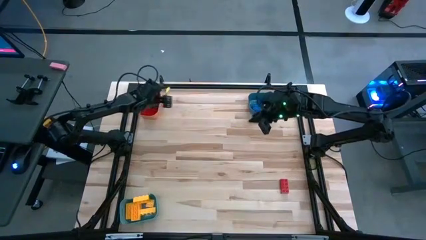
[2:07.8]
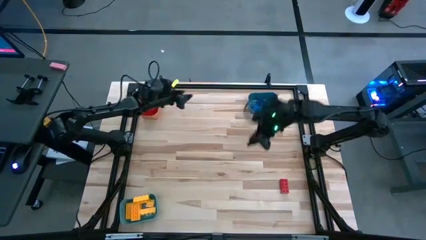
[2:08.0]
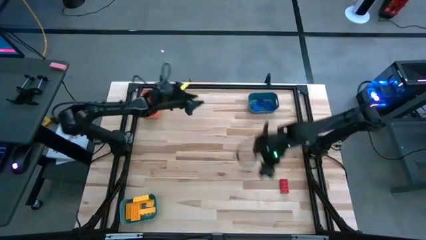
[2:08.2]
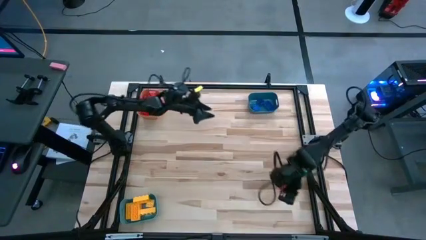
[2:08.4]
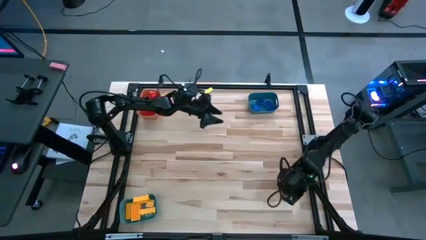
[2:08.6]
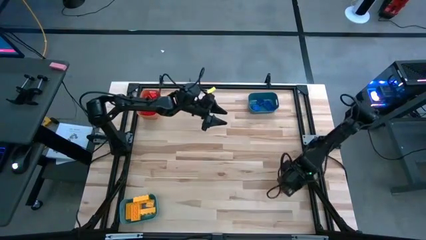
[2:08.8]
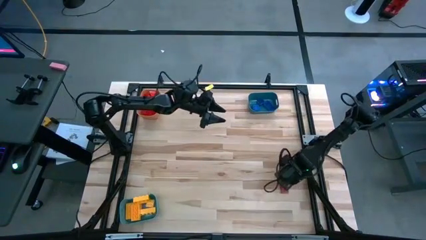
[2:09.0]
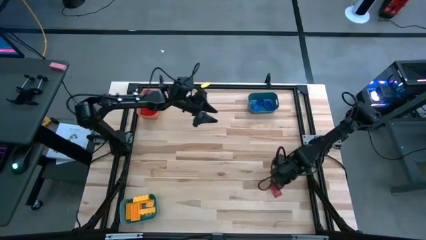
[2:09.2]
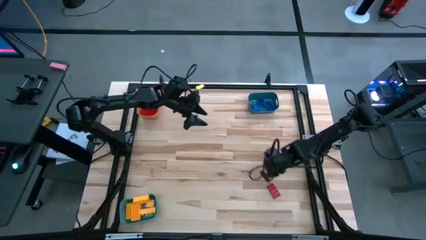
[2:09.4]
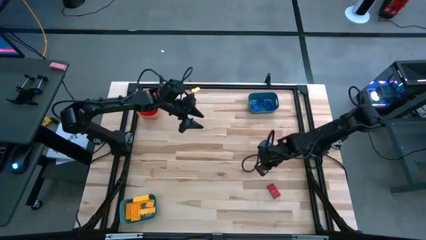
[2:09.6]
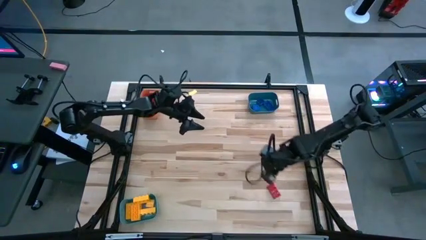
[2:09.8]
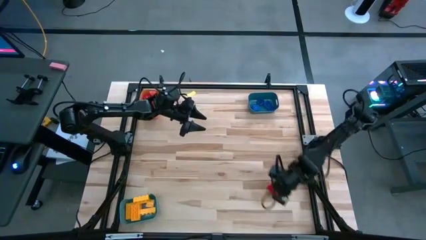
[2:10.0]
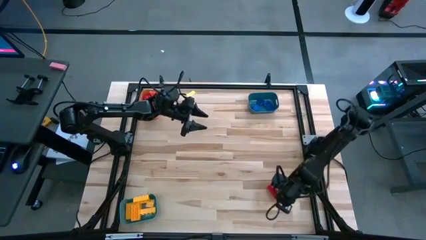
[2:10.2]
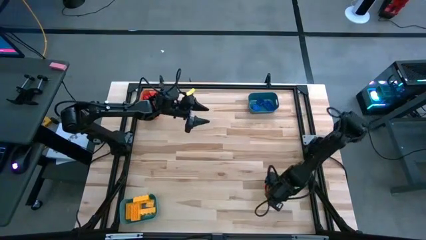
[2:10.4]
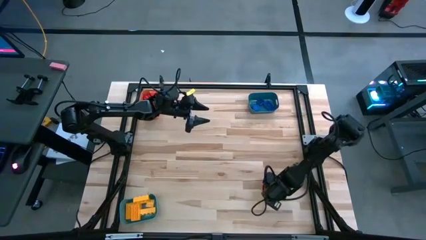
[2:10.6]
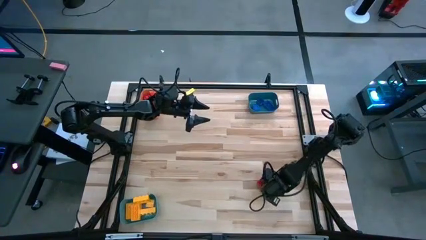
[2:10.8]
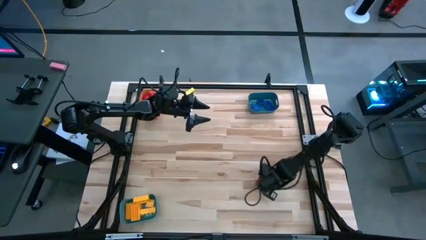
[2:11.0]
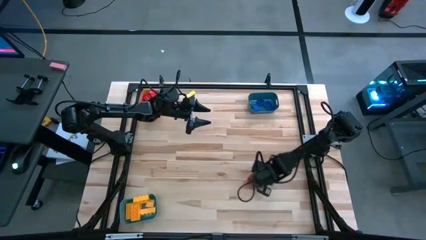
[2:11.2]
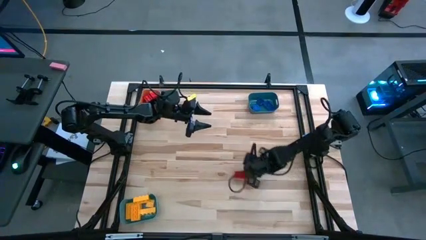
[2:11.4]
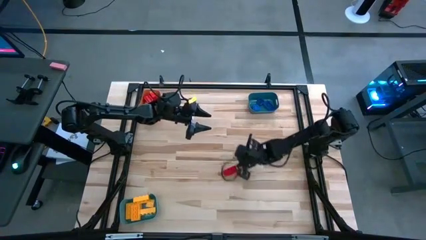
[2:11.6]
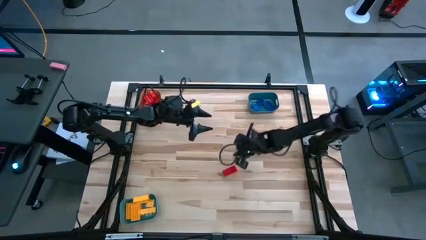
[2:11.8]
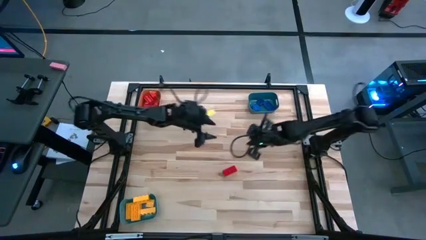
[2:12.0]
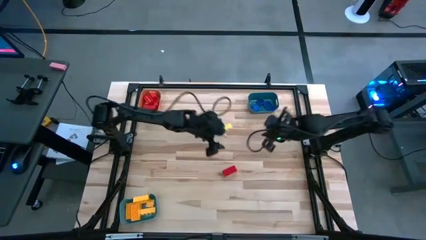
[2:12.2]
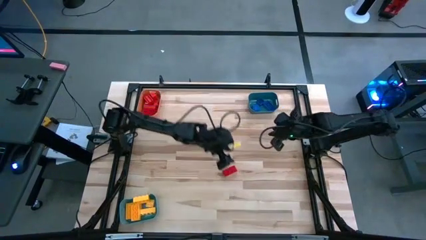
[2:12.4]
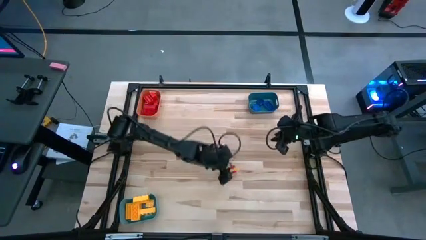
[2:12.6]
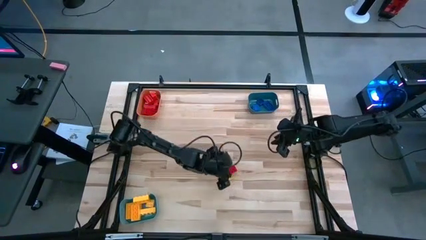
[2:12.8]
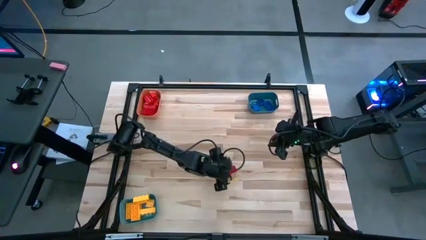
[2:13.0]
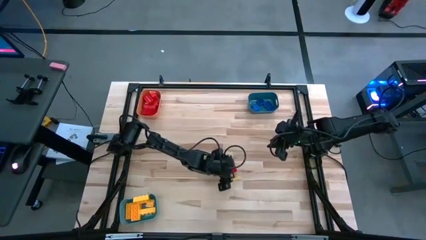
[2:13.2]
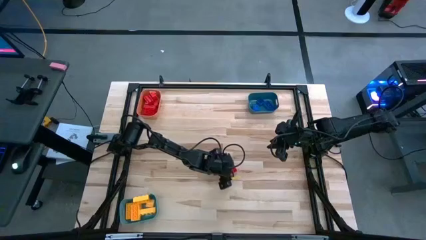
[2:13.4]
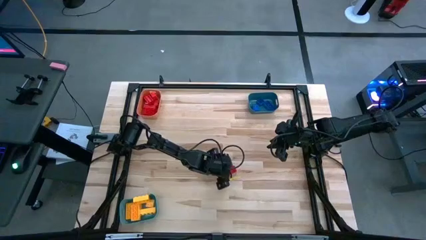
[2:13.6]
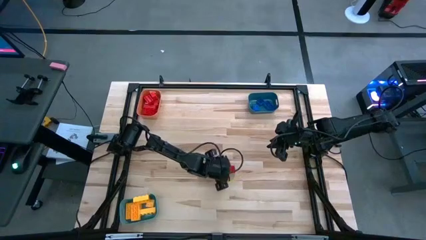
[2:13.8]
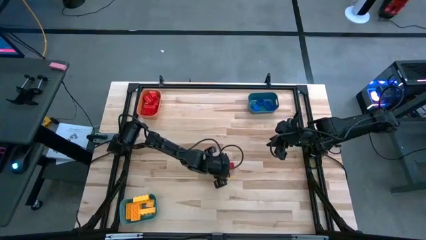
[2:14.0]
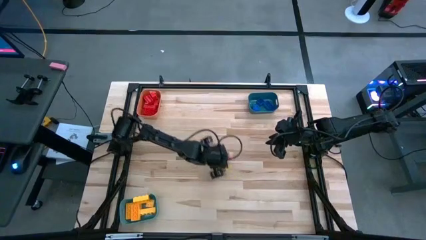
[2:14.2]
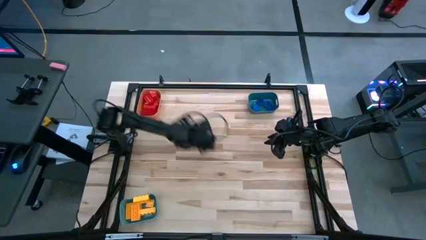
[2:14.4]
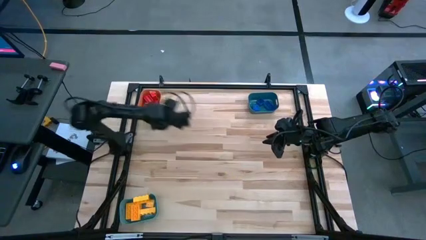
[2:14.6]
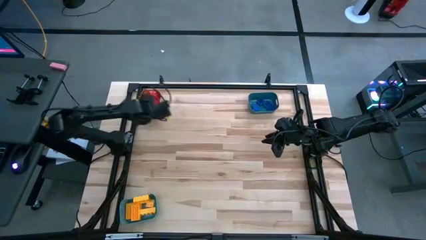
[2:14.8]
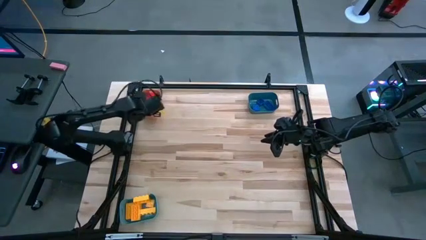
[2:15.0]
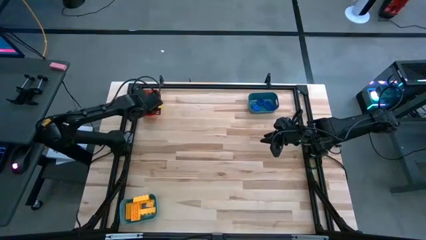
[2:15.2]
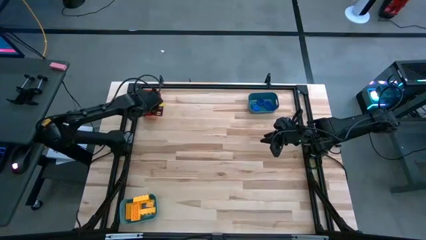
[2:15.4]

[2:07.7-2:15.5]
Task: Sort blocks
Put the red game piece into the orange bin

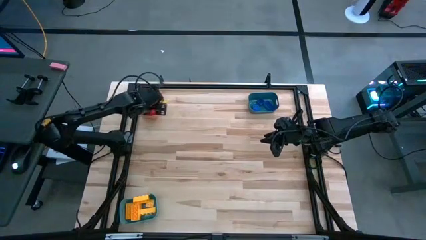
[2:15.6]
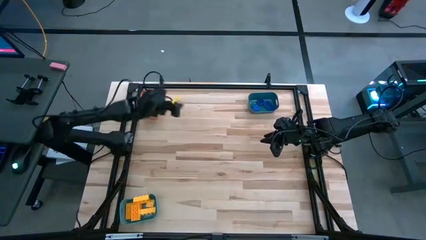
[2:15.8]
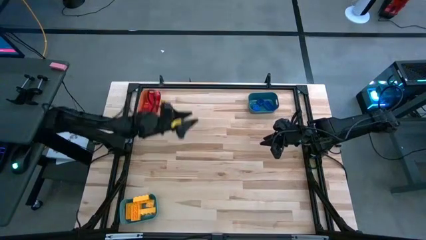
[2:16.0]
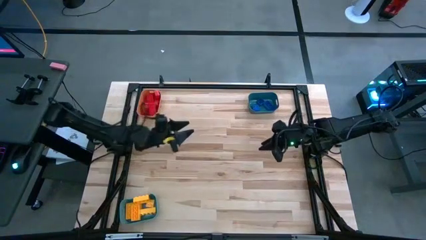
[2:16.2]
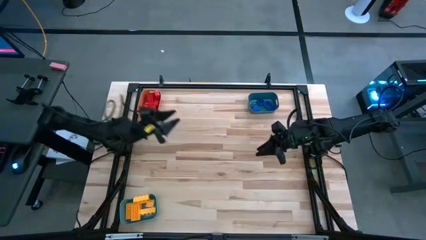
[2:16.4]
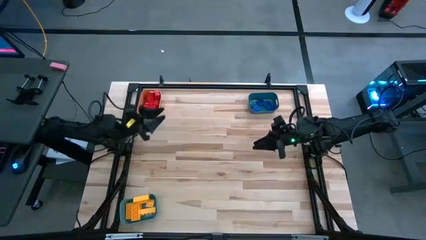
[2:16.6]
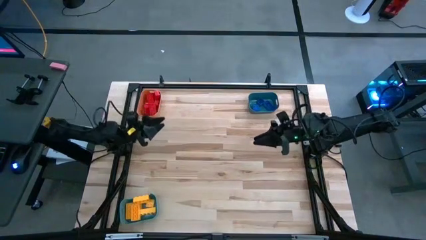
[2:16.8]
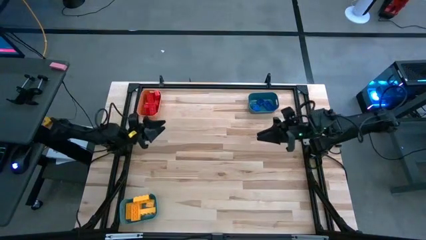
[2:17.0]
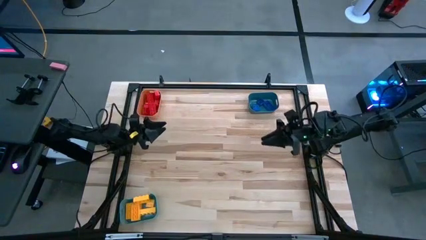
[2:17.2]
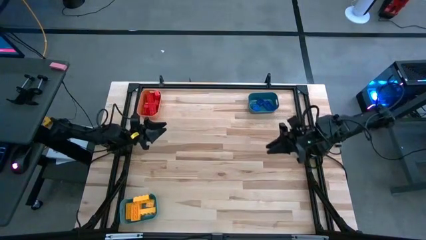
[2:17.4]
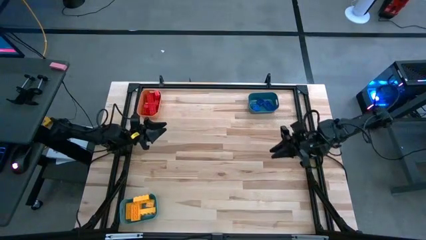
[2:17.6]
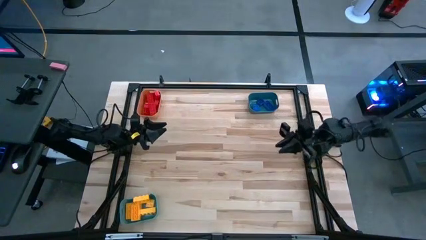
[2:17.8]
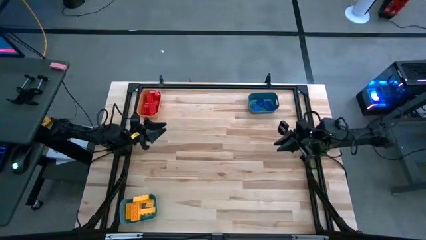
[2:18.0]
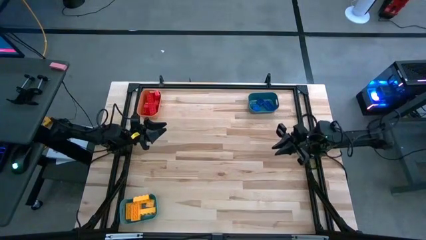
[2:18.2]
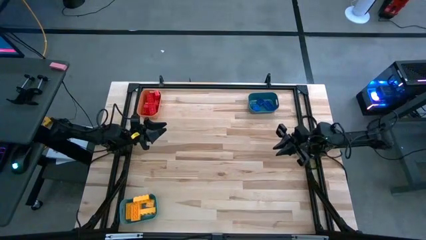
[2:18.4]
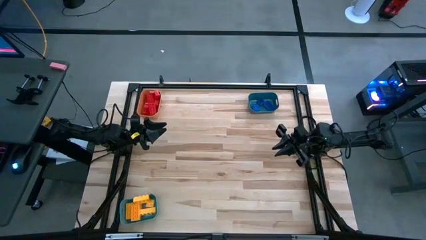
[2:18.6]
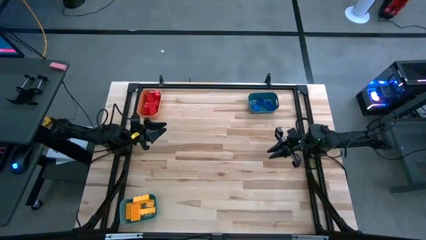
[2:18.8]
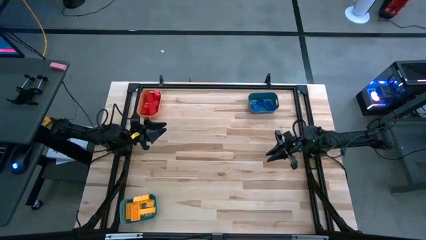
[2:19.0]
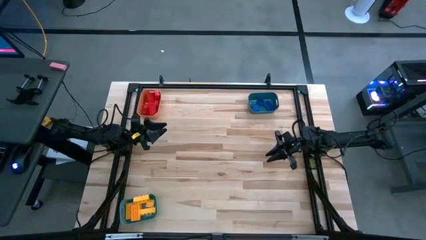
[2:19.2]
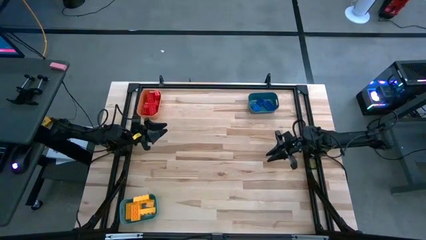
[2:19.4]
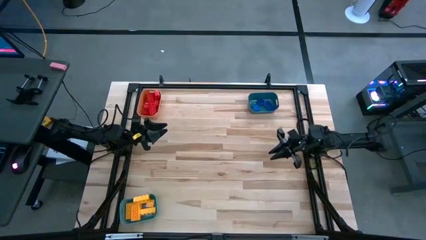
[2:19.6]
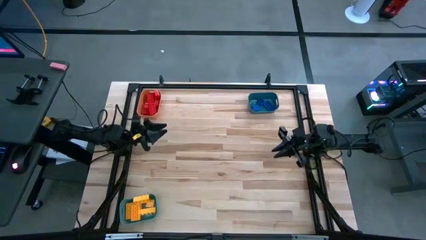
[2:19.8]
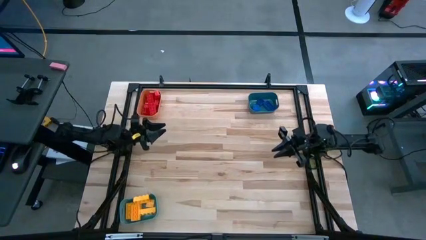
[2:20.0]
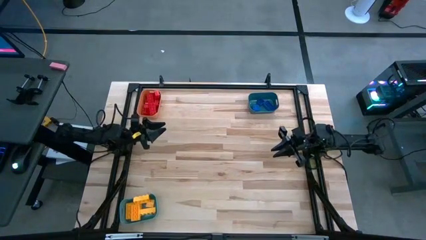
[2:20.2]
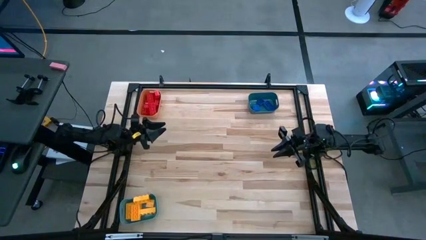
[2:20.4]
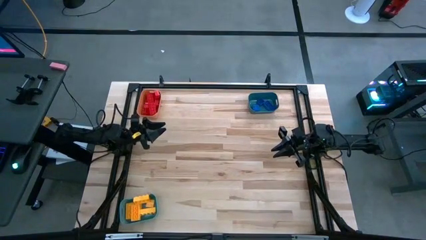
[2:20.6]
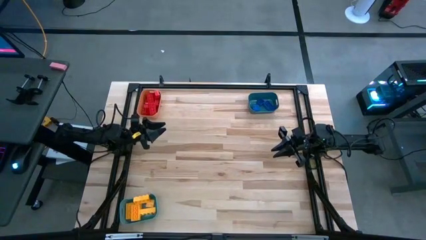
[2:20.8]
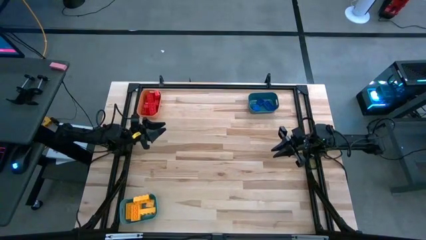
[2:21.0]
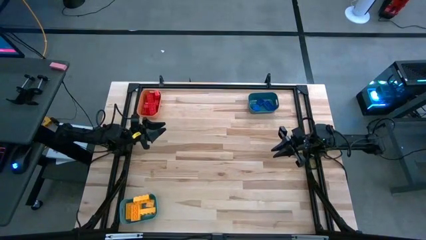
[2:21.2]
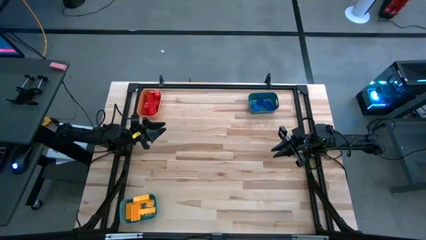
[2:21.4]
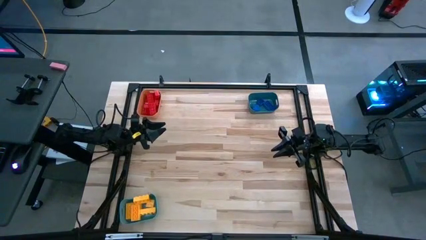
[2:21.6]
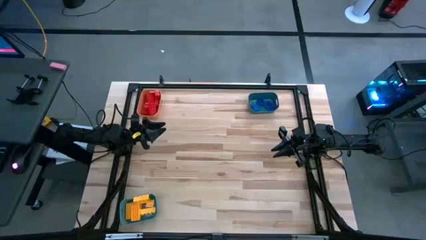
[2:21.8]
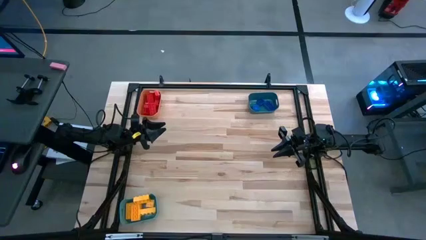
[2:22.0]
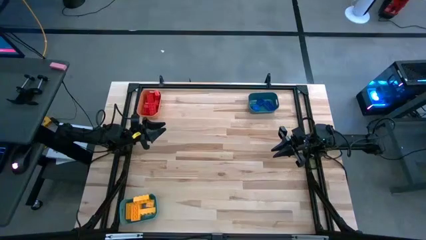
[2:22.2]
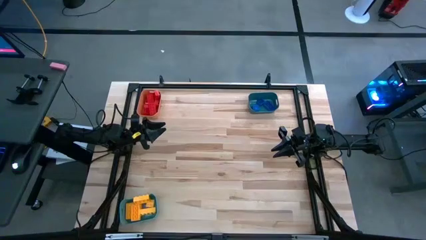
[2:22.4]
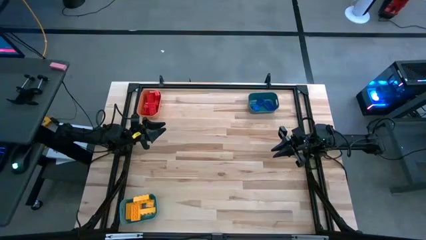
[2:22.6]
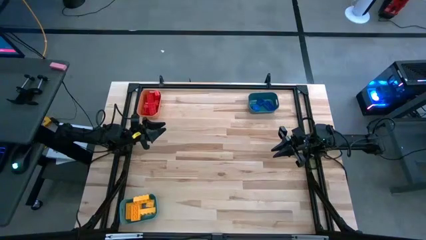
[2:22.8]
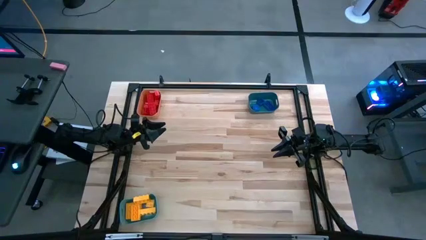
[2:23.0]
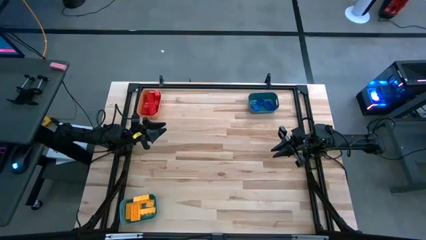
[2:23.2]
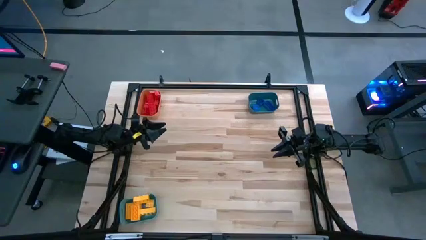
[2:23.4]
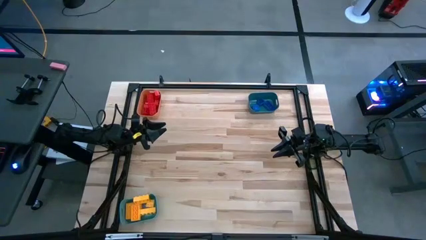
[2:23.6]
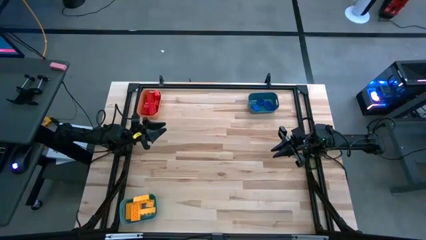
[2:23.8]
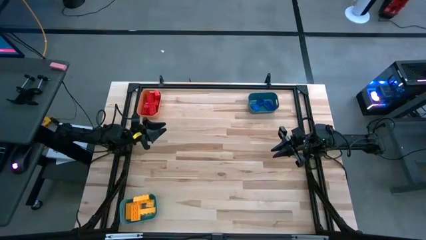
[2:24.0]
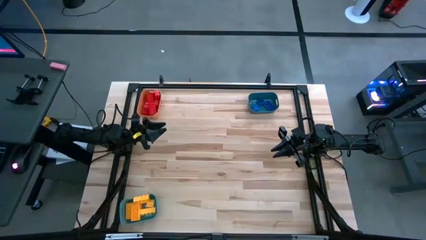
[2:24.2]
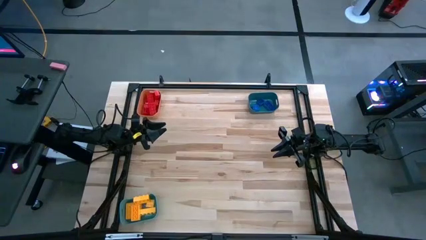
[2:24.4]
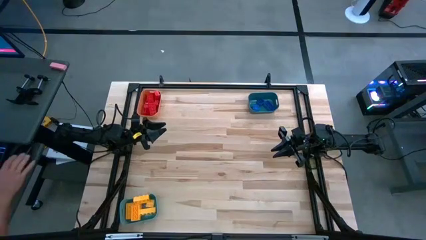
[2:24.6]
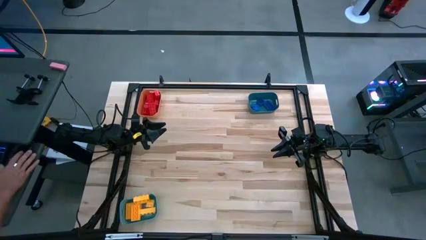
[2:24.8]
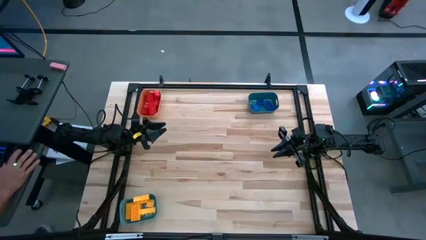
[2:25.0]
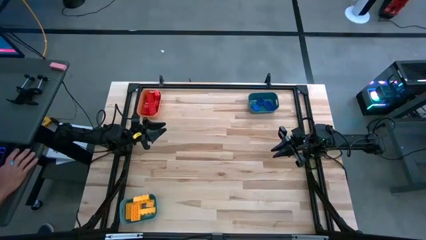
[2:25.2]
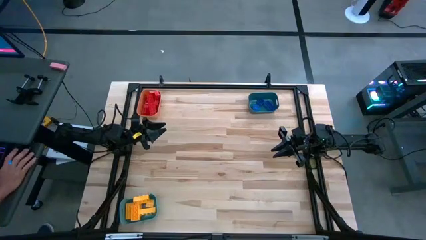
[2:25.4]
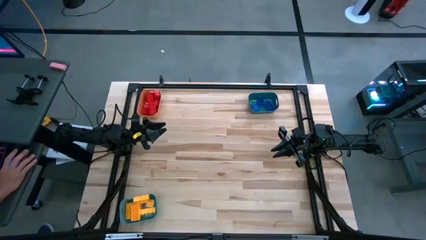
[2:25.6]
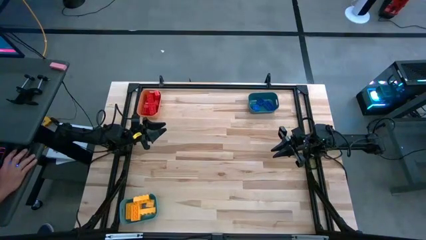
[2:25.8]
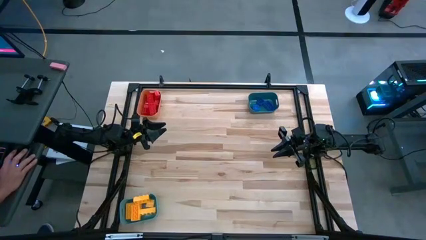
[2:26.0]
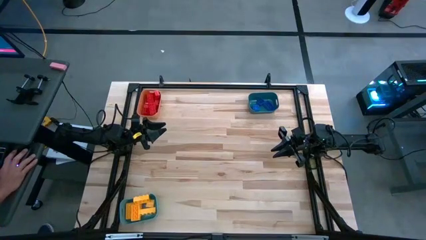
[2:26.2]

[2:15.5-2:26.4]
Return to home position
